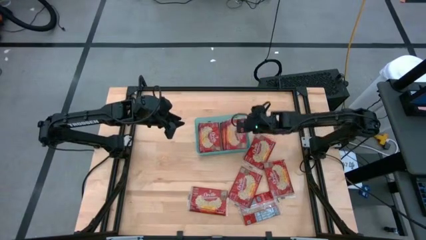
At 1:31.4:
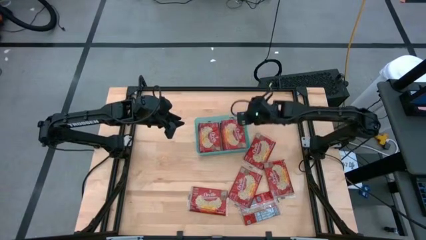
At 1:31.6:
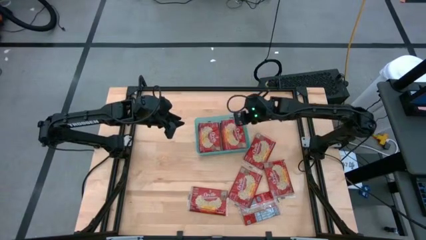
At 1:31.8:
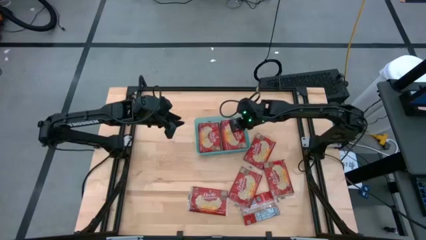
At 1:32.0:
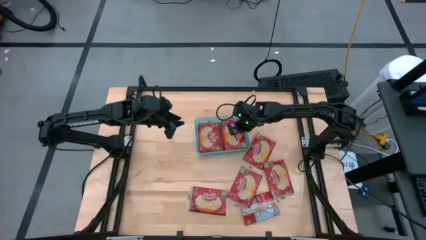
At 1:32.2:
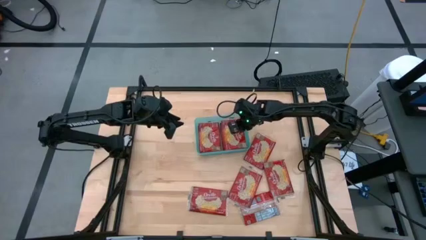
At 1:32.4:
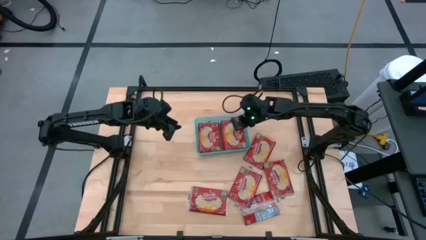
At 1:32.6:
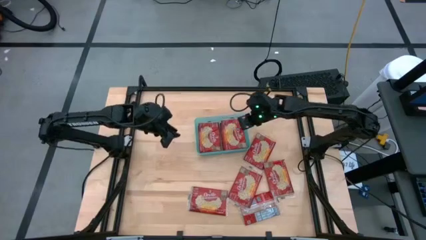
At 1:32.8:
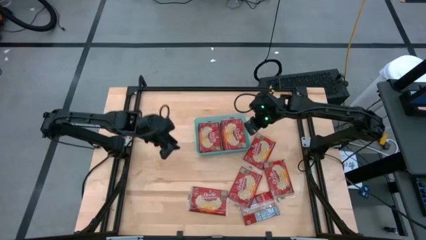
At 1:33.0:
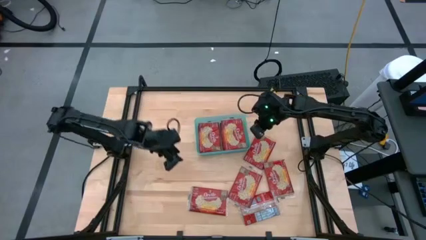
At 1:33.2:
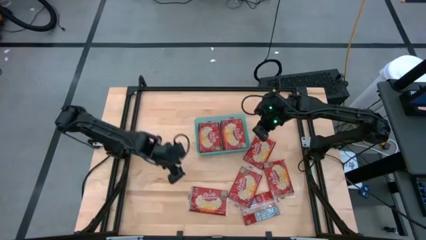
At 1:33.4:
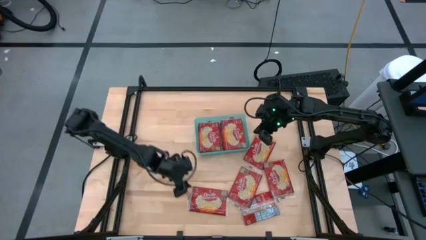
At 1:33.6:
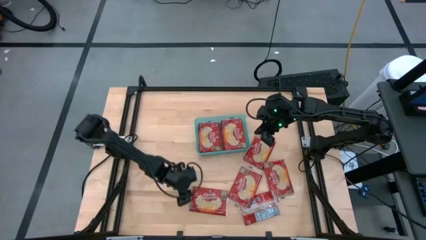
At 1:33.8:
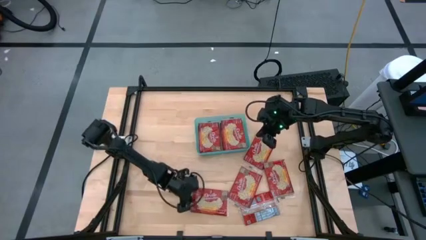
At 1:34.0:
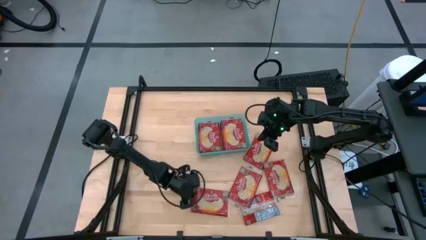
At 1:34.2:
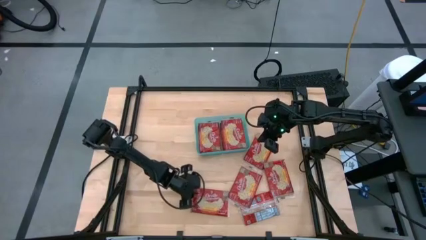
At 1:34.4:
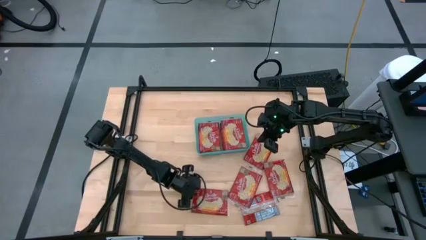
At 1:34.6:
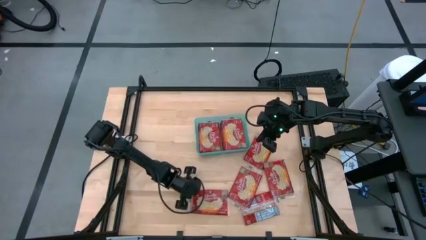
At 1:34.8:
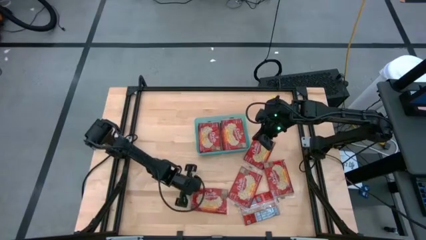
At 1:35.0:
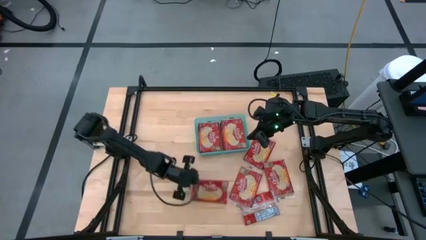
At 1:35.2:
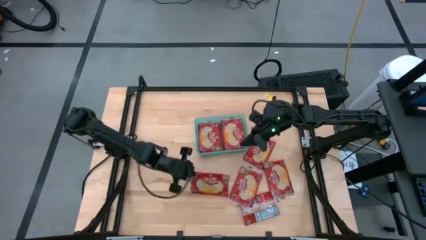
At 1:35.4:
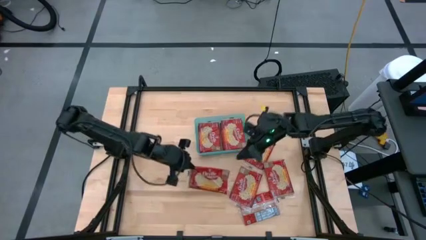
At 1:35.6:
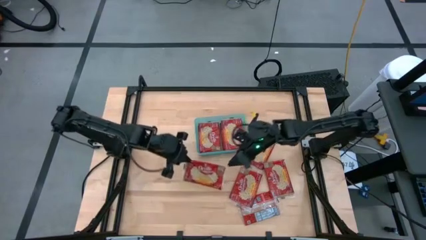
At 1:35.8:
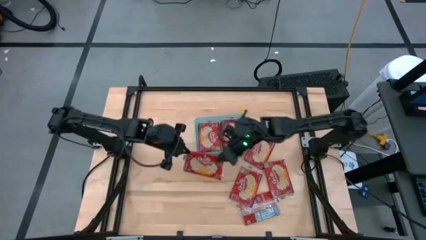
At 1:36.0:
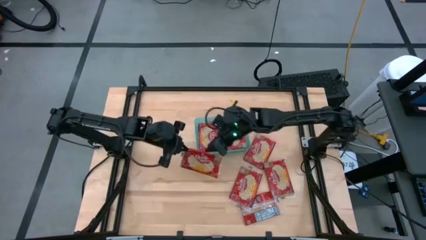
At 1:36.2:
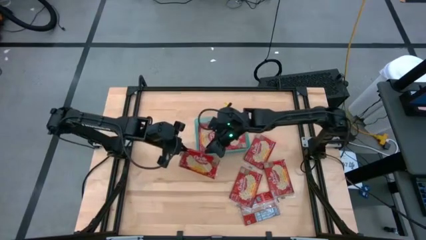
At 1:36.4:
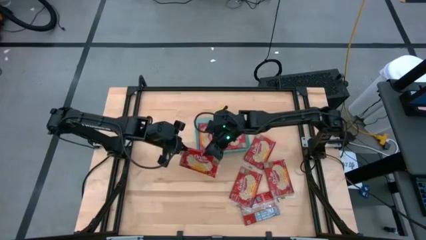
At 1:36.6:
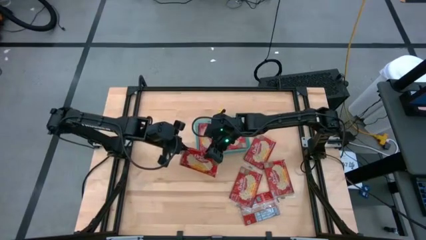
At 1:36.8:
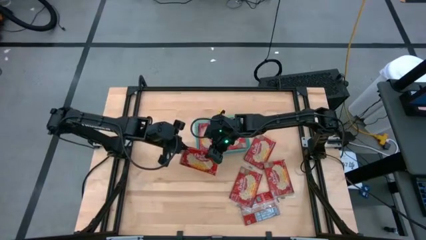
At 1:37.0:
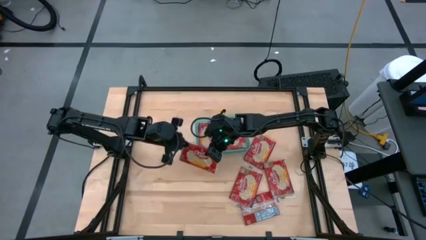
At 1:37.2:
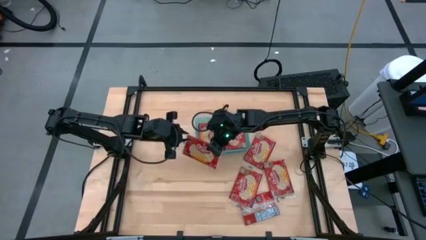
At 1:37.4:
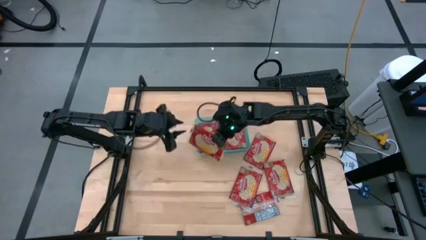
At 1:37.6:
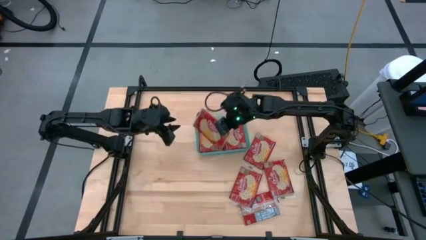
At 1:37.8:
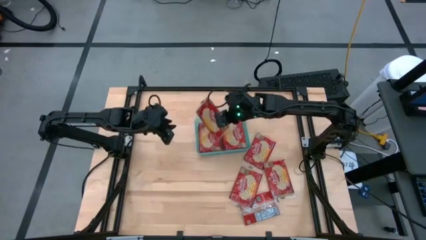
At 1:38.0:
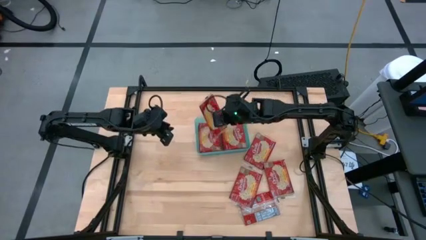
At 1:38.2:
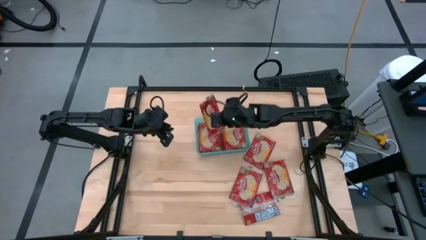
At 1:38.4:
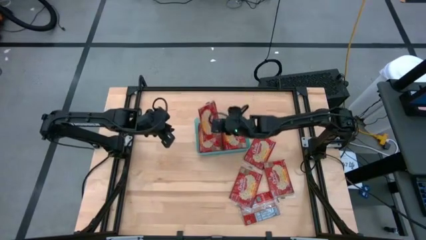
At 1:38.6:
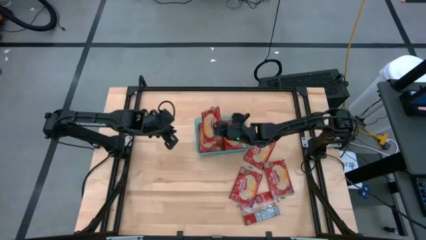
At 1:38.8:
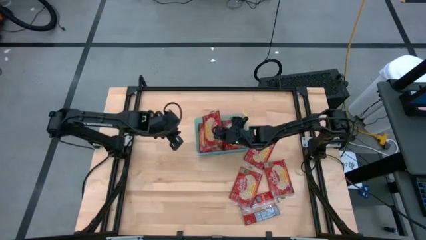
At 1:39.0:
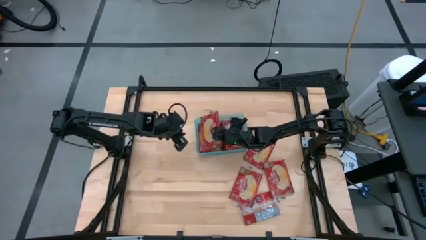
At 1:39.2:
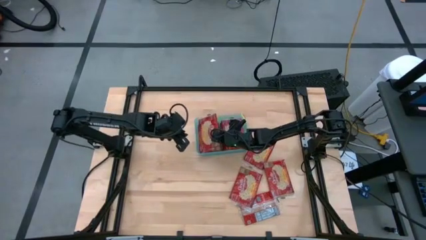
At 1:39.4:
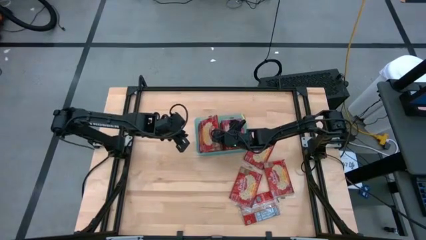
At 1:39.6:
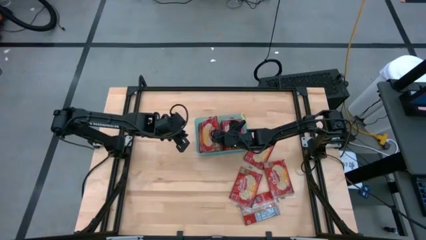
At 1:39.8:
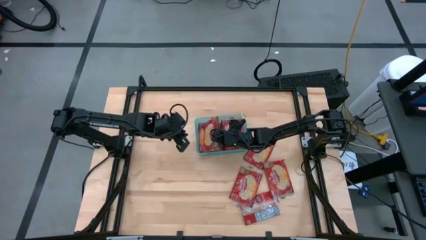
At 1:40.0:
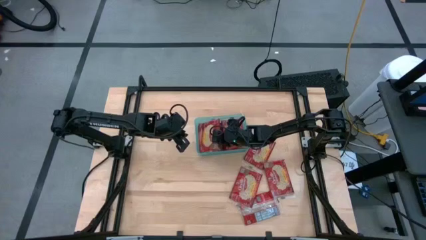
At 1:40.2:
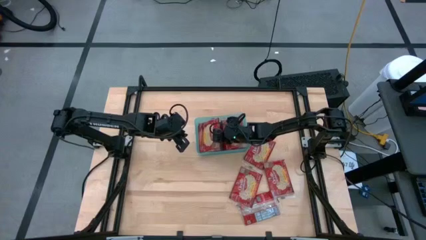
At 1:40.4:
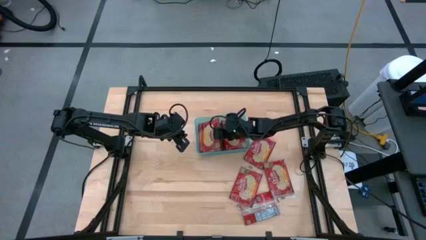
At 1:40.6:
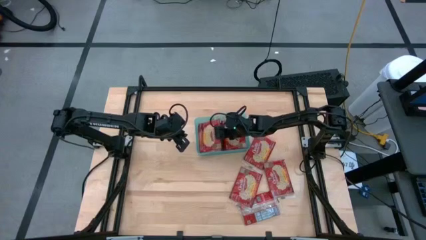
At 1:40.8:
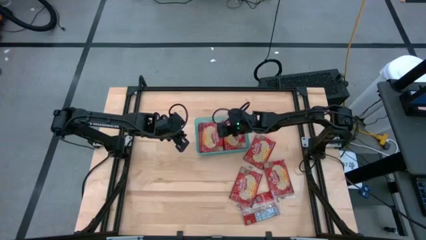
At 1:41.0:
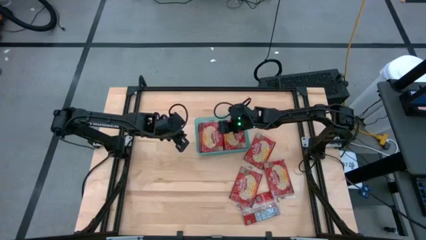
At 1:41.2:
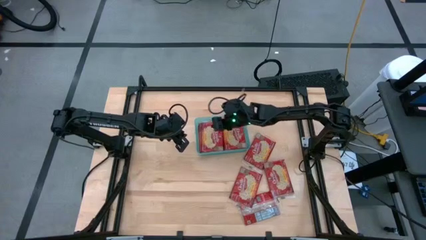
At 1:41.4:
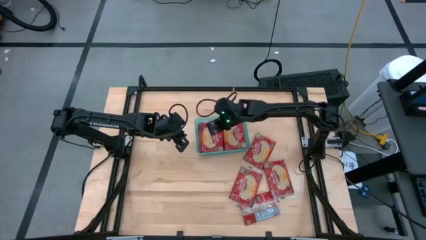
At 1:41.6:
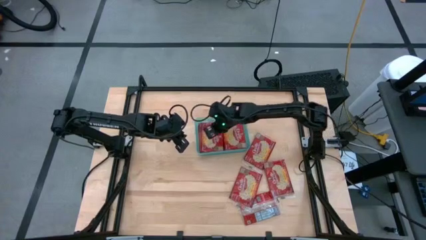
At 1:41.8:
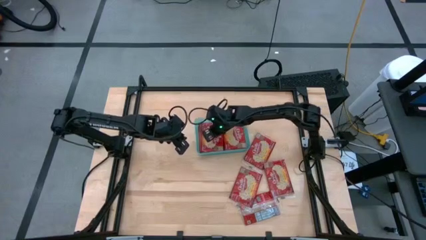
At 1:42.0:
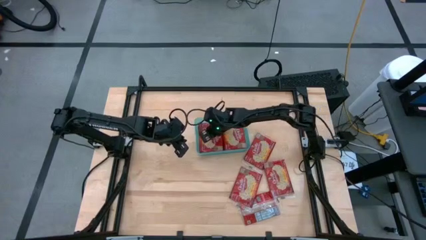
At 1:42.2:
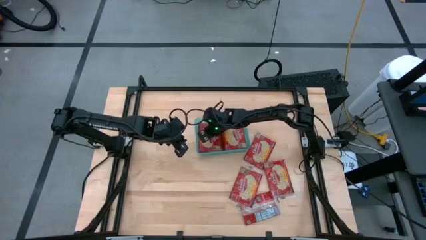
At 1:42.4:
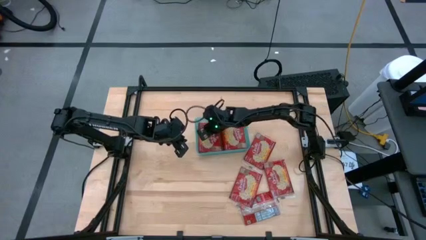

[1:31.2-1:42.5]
Task: Sort popcorn bags into baskets
Put the red popcorn bag into the green bin

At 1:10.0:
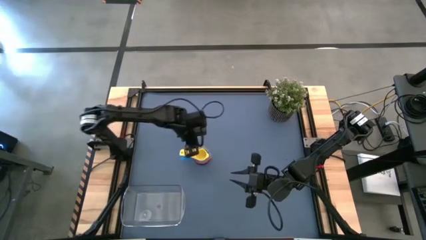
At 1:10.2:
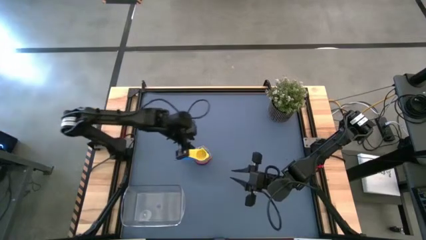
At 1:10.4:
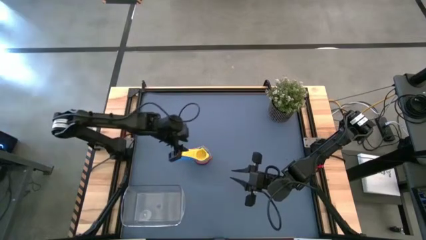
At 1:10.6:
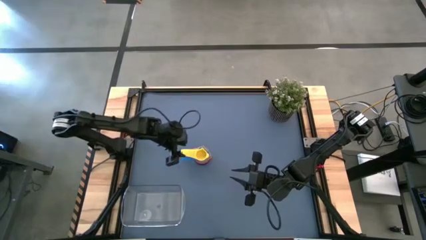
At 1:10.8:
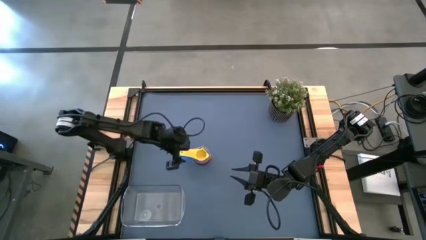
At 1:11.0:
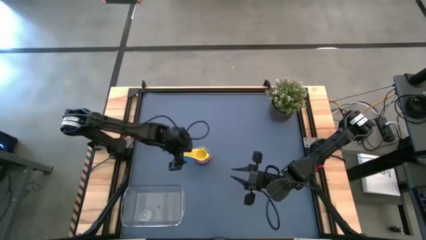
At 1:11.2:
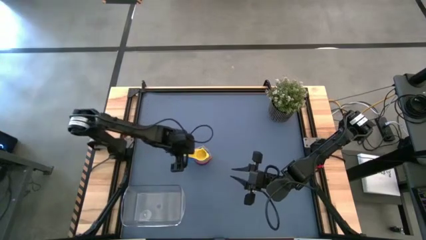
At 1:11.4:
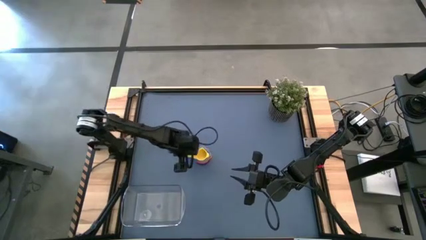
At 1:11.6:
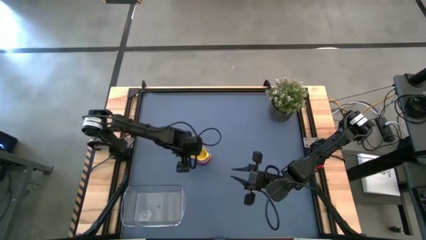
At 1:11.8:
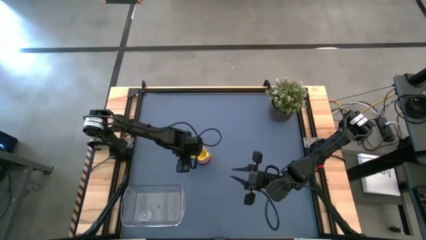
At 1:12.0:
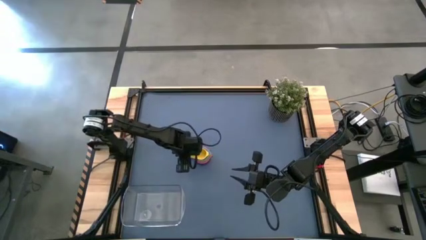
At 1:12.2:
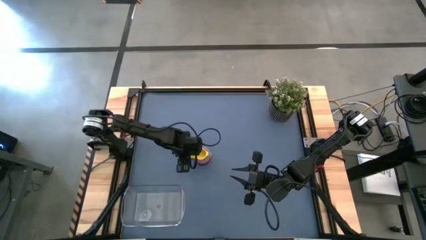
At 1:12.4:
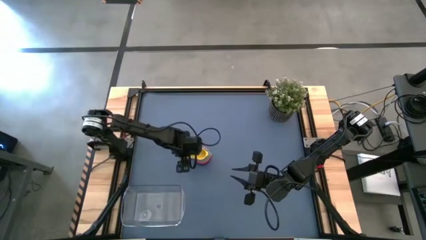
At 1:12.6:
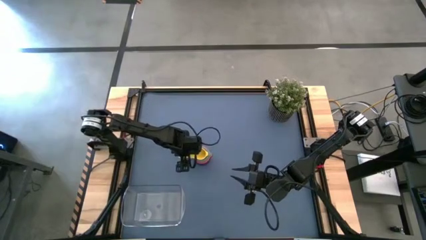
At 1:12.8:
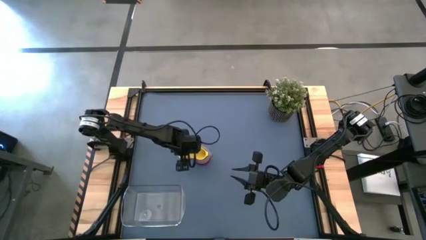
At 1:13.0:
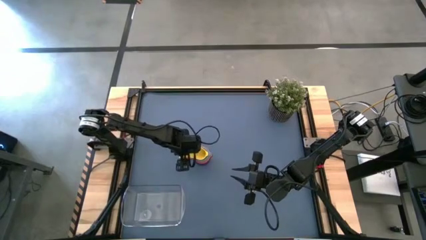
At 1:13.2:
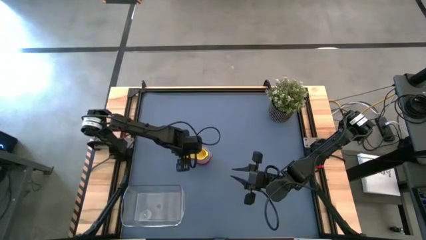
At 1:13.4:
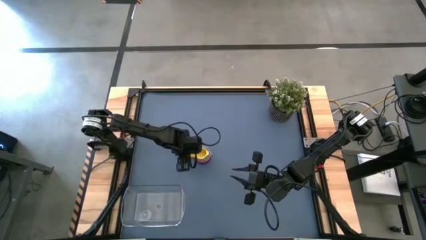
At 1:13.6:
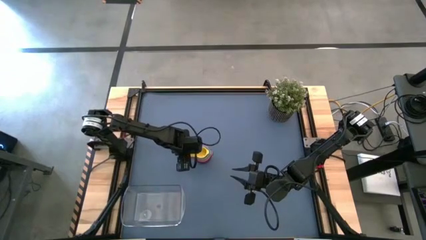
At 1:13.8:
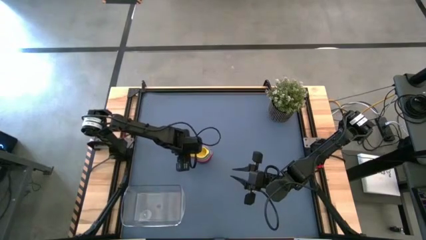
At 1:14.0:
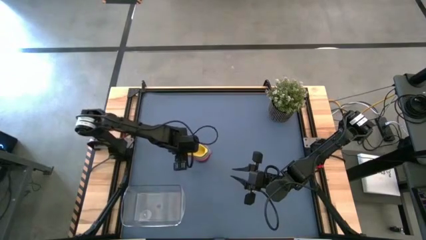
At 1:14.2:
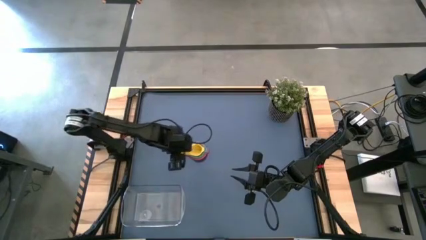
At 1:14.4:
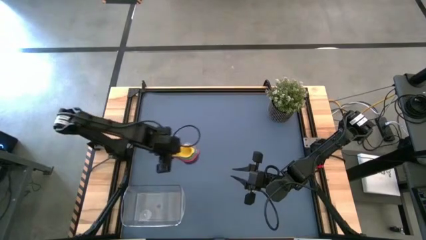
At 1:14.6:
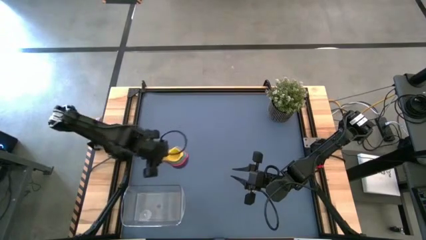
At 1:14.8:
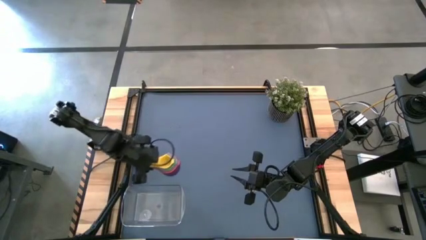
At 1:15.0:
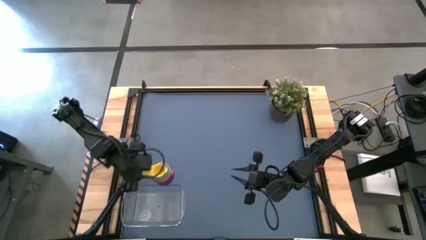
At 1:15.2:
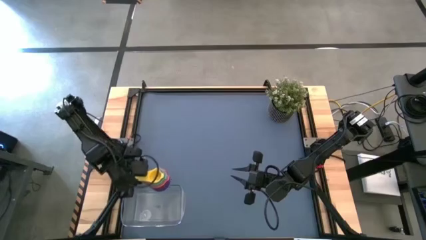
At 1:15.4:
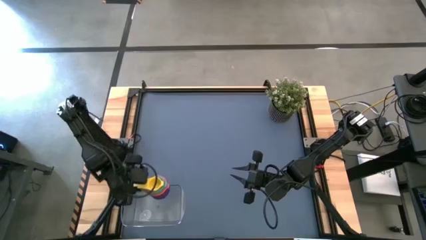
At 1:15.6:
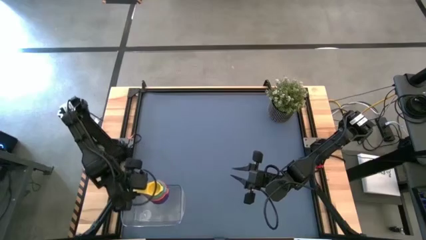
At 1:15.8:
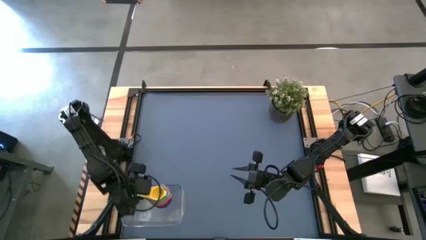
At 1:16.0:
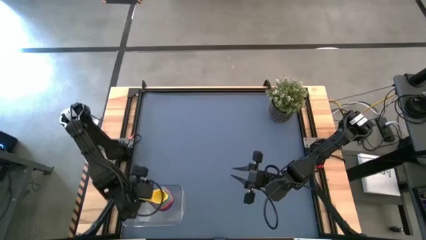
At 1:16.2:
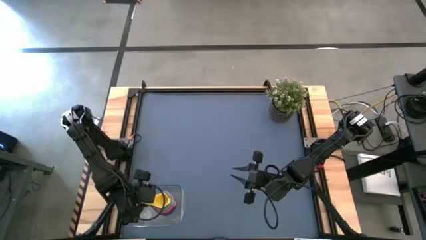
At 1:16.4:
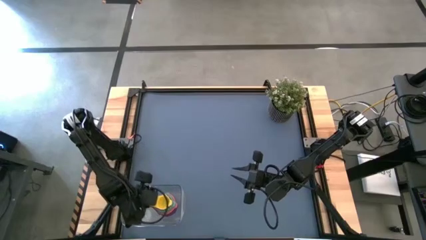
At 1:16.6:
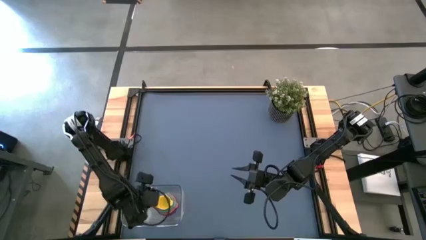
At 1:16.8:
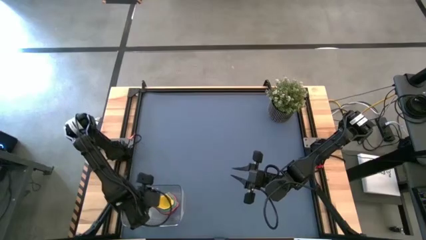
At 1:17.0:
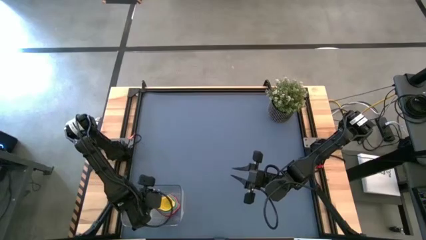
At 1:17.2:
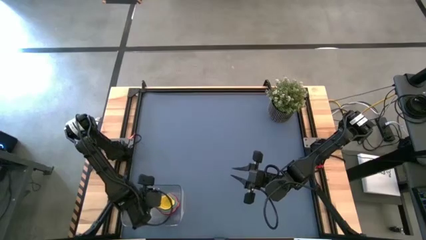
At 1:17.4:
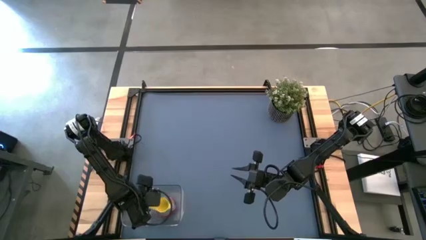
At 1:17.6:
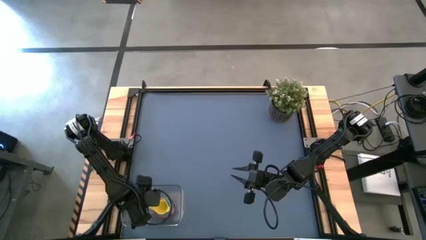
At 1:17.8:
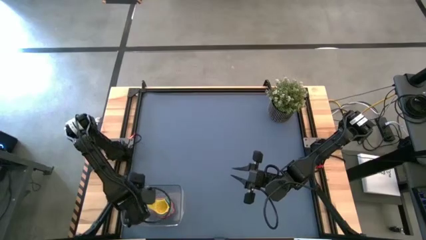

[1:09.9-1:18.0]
Task: Nest measuring cups in basket
Put the nested measuring cups into the transparent bin
